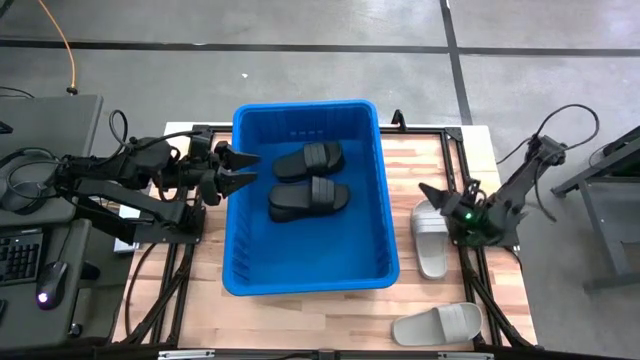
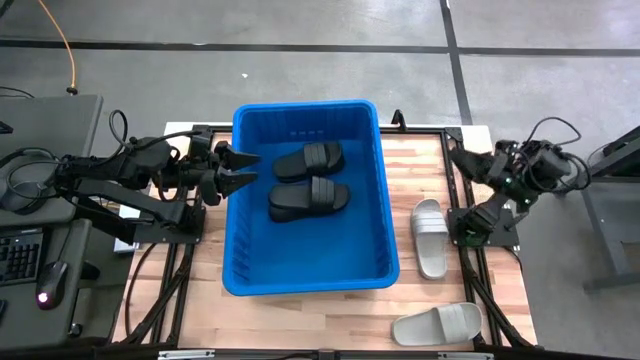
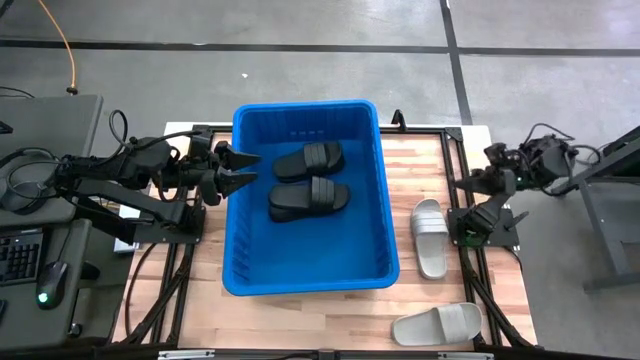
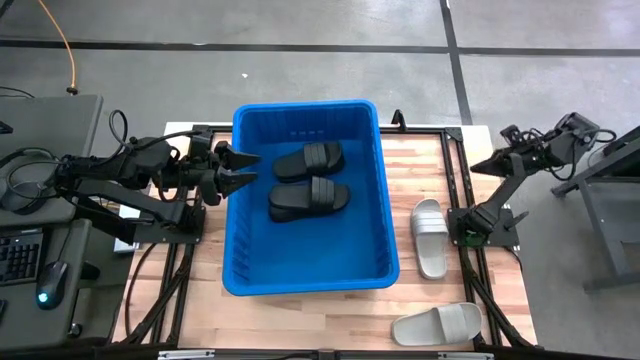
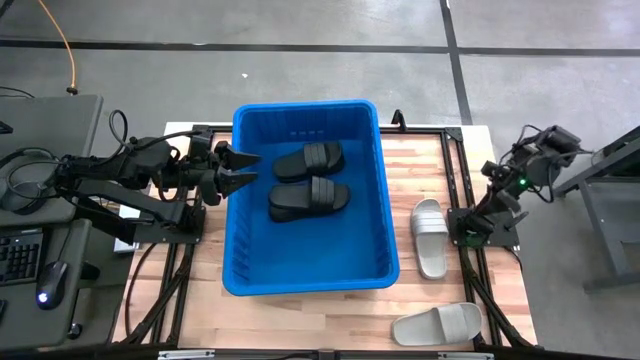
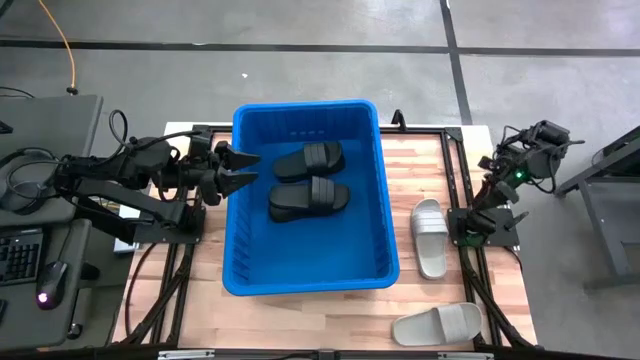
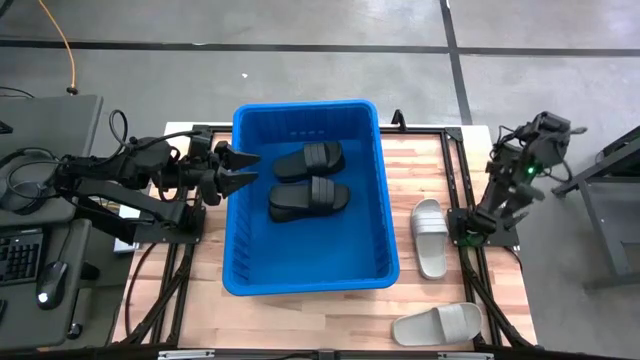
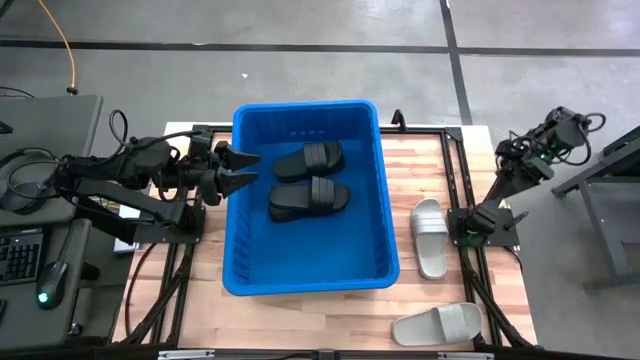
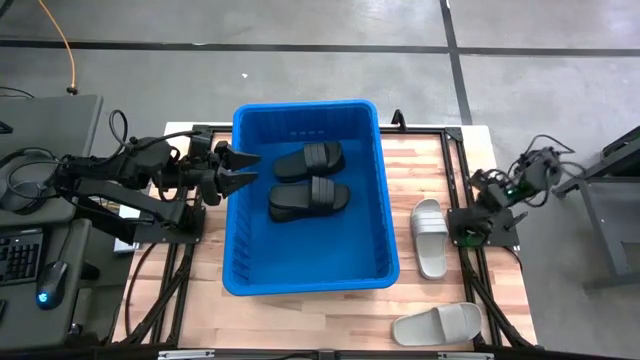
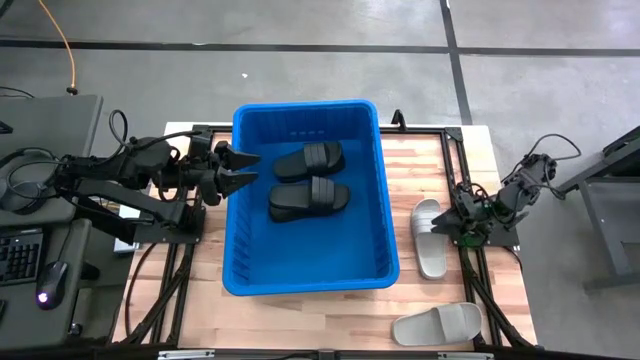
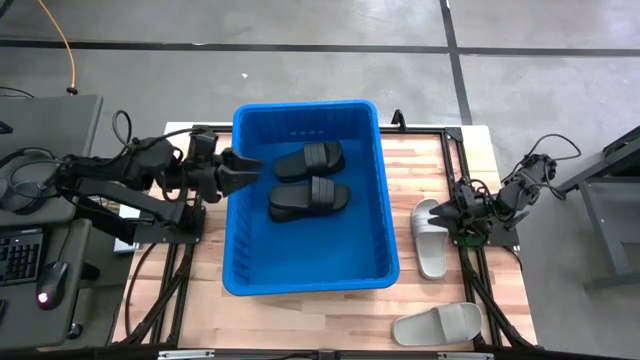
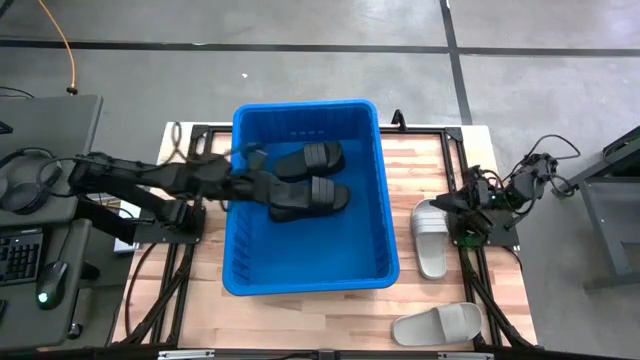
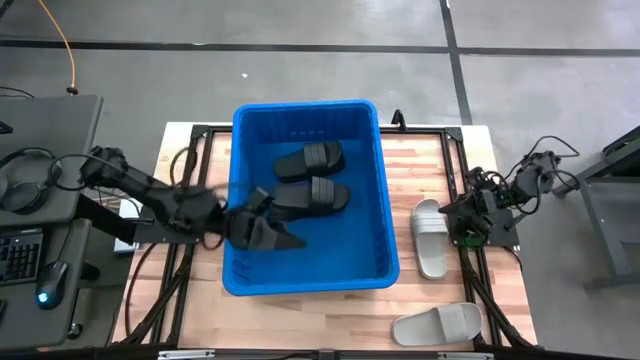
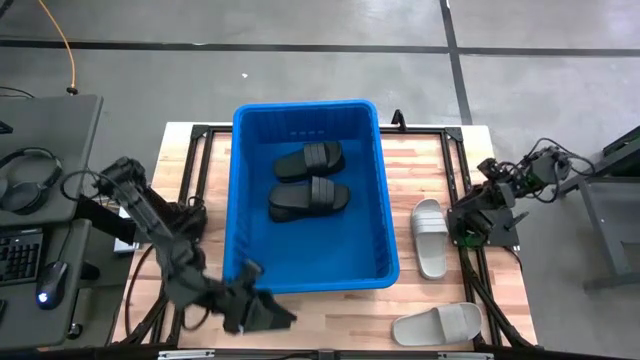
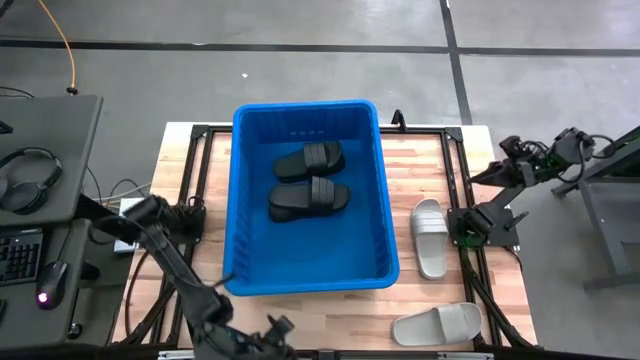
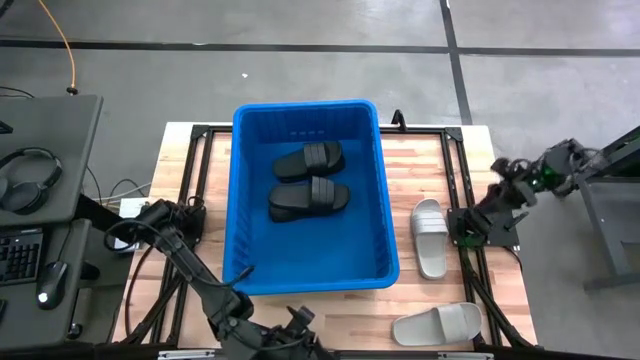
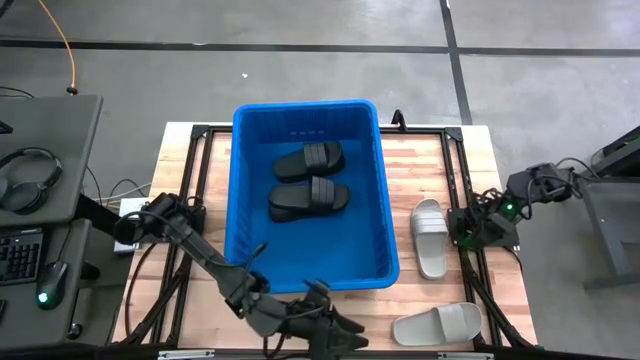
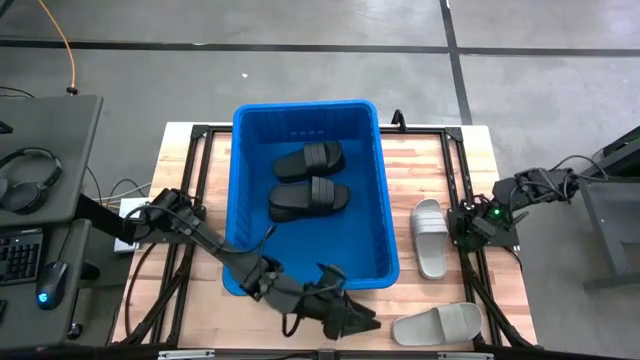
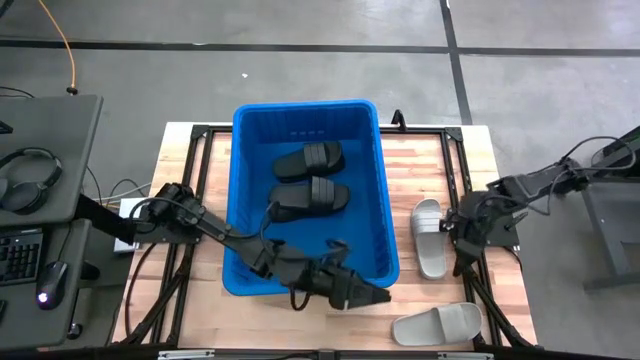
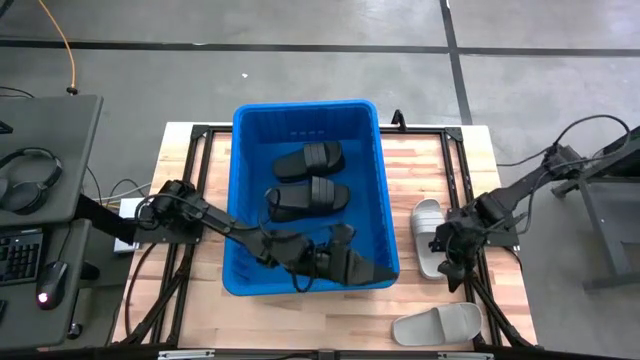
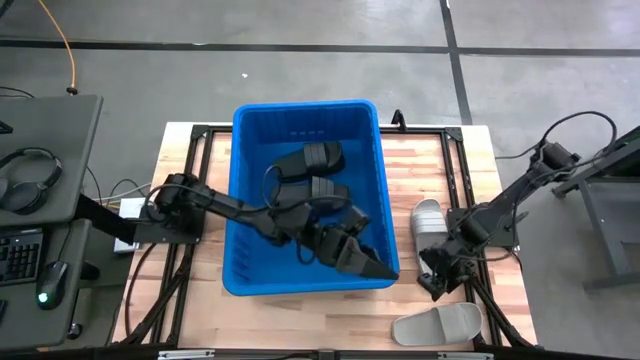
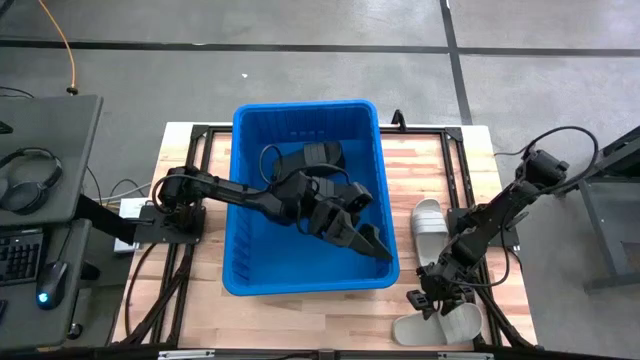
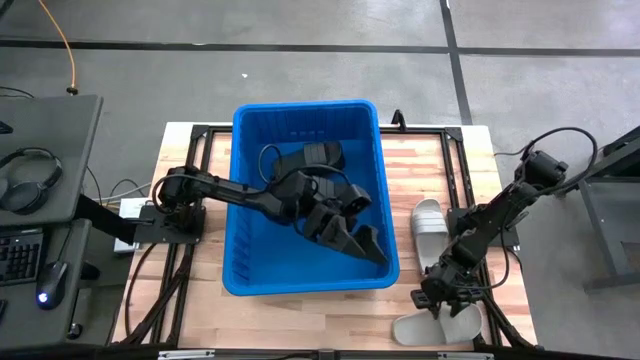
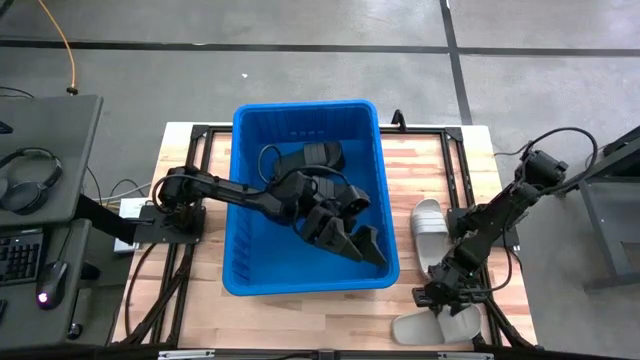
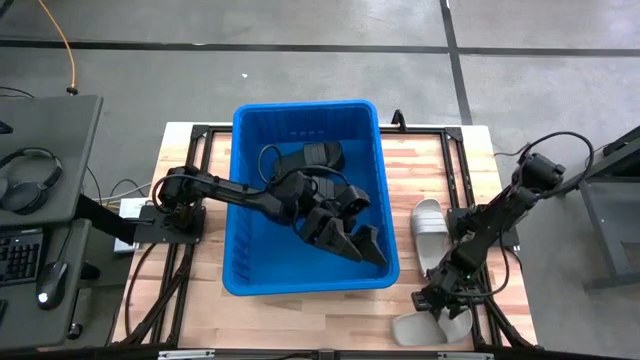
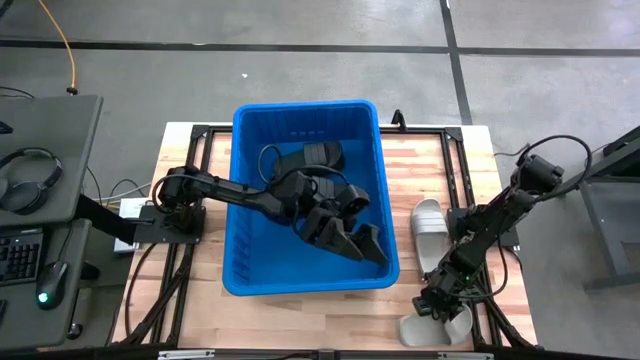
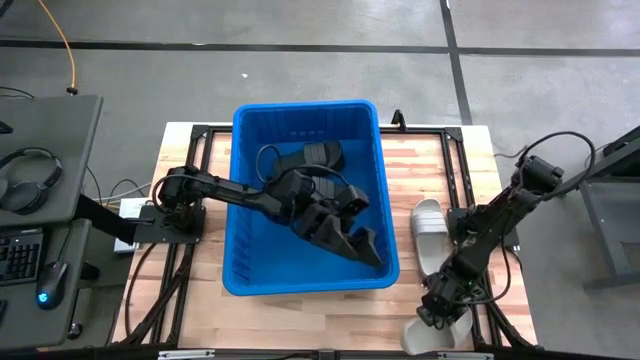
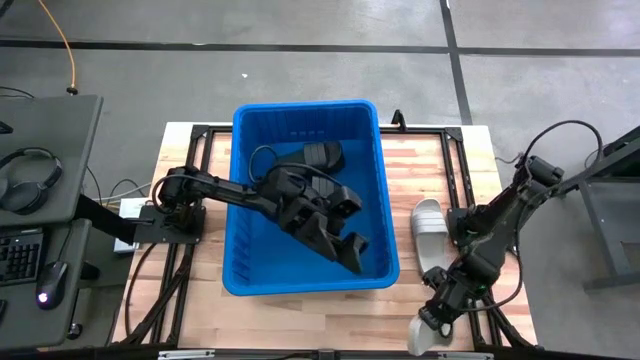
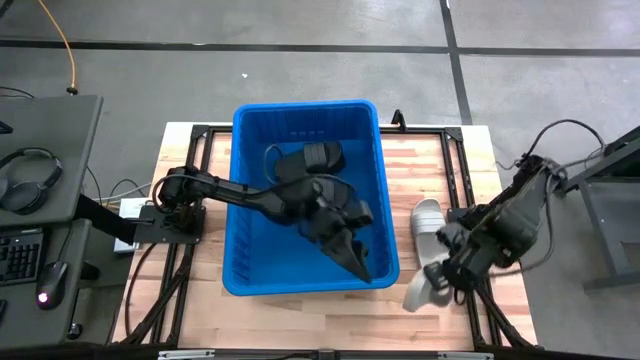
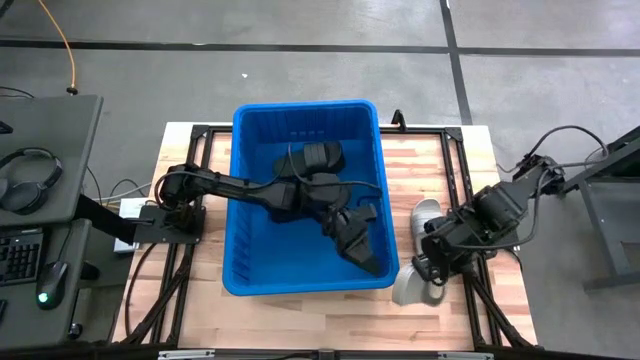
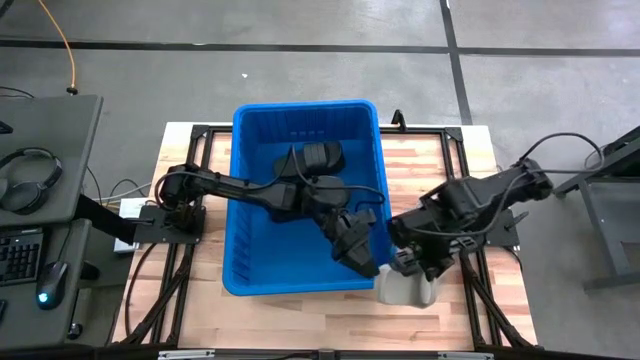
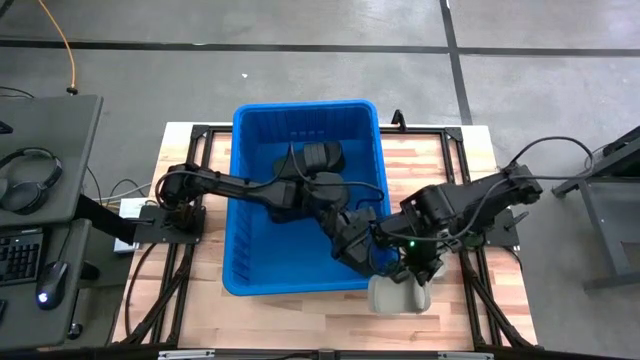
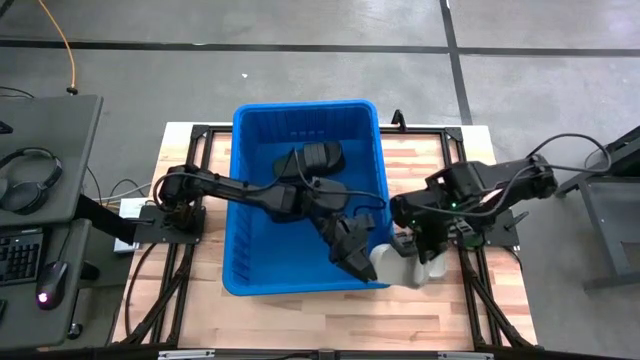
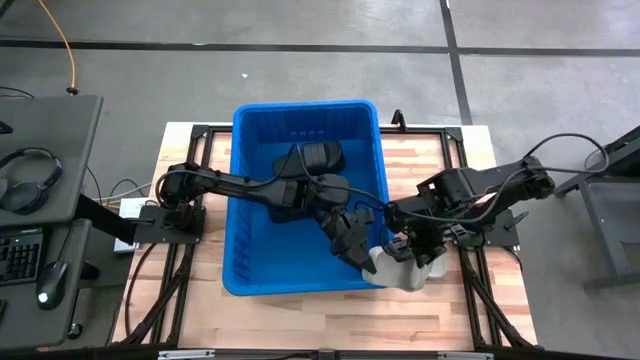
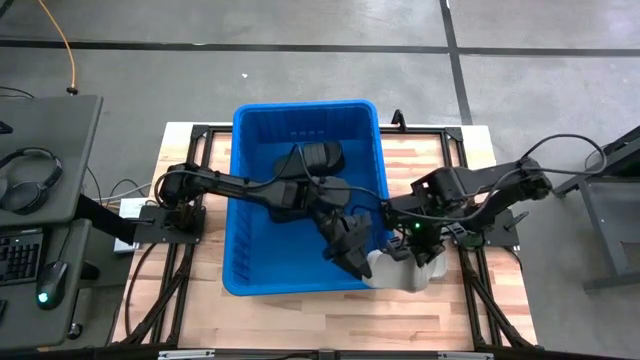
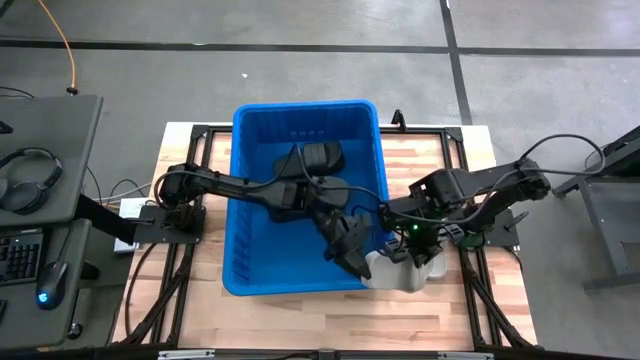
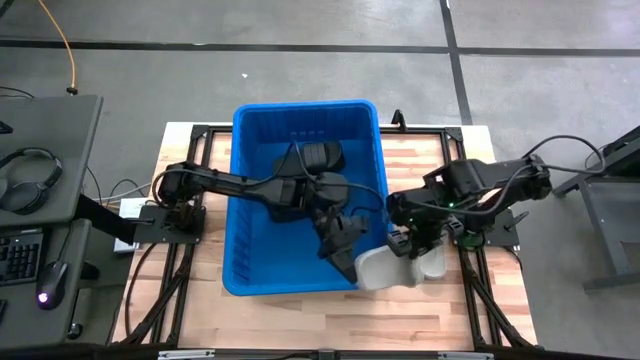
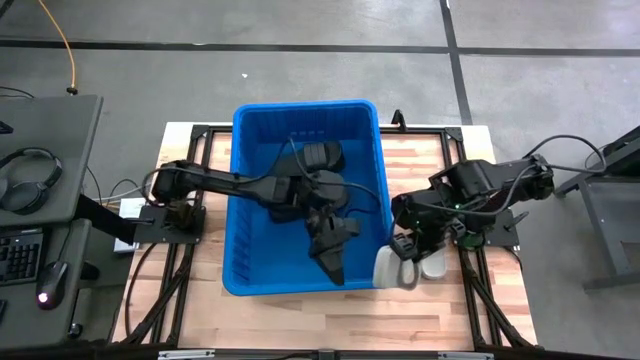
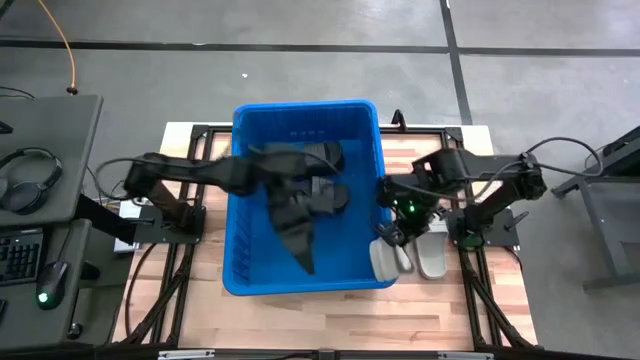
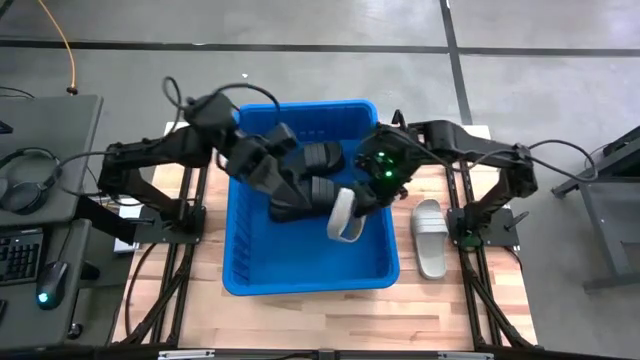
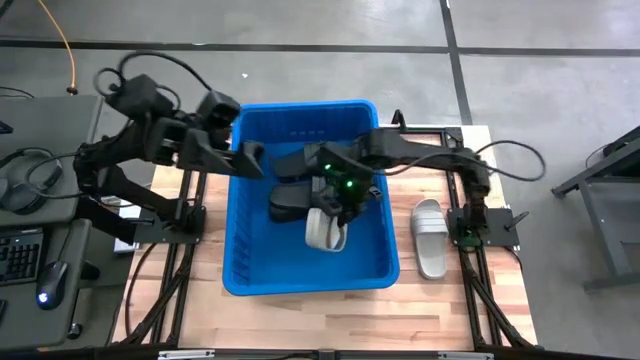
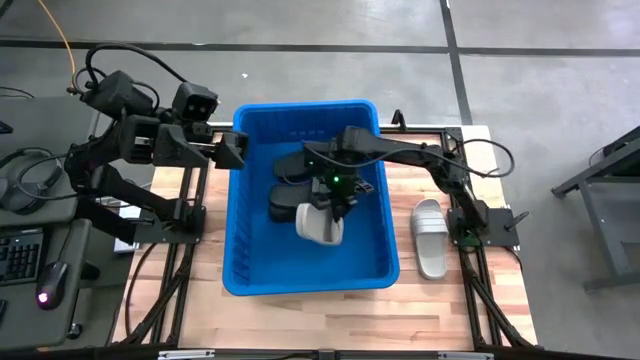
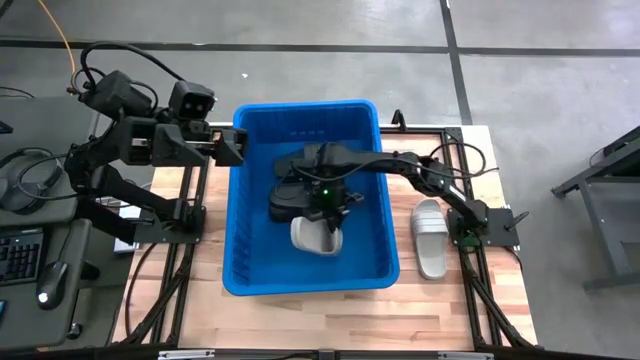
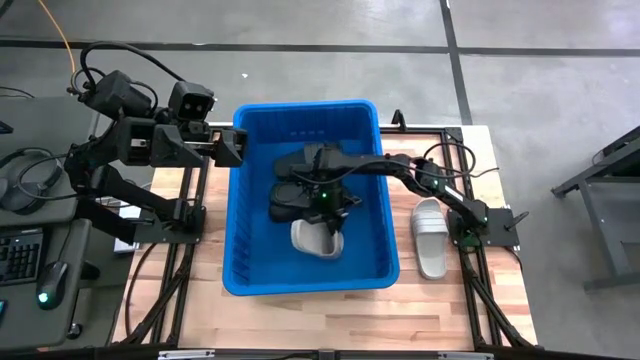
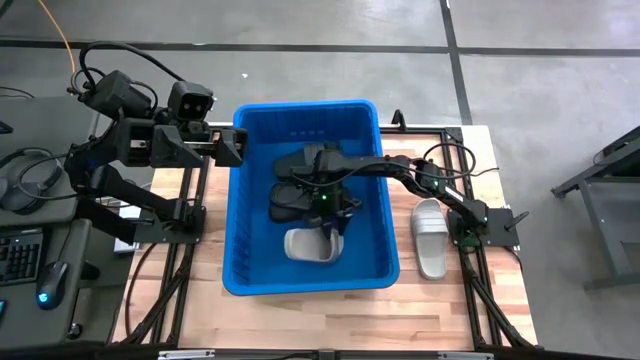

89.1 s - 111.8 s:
Task: Pick and place slides into bin
Put the gray slide into the blue container
